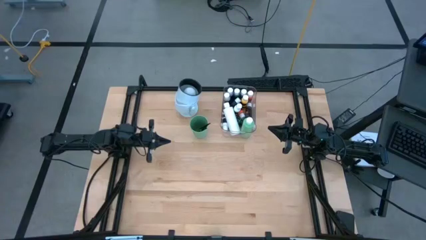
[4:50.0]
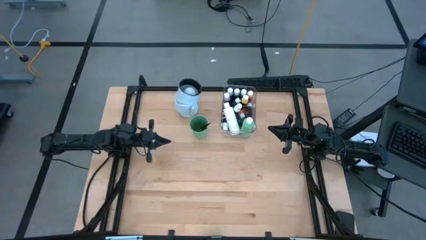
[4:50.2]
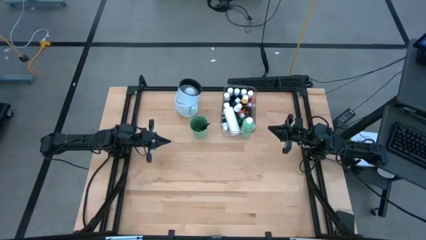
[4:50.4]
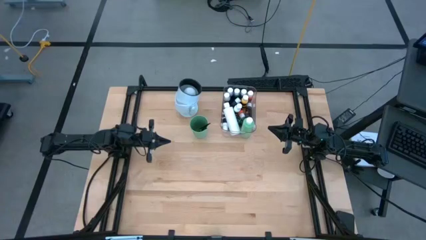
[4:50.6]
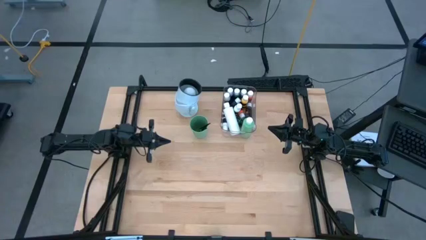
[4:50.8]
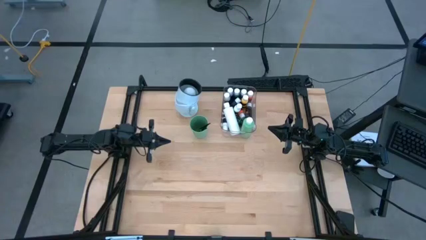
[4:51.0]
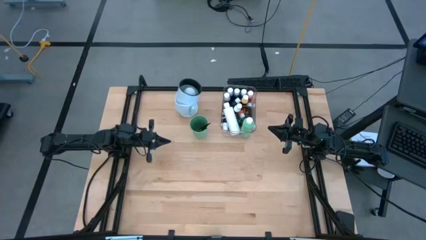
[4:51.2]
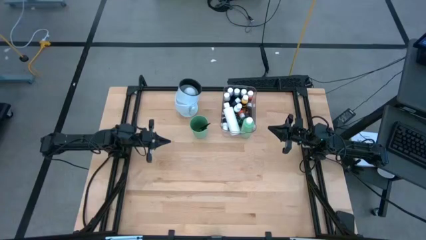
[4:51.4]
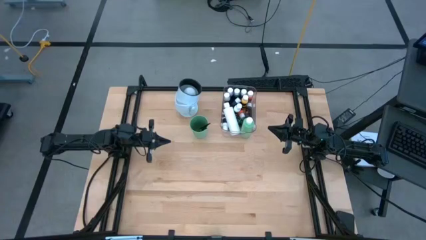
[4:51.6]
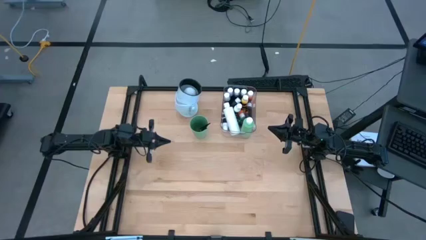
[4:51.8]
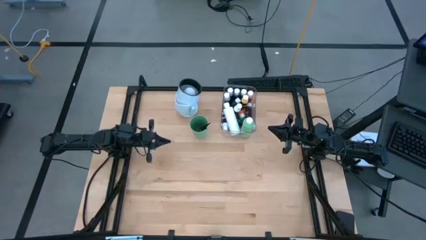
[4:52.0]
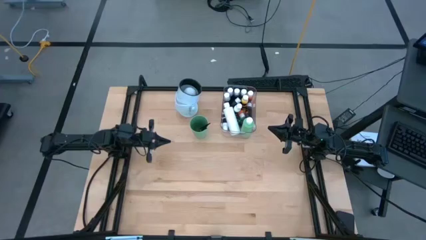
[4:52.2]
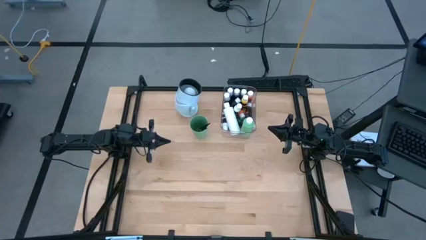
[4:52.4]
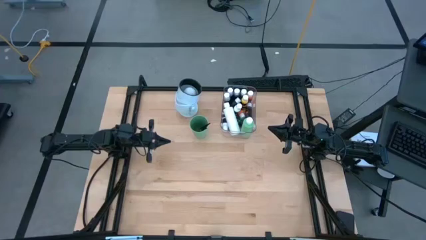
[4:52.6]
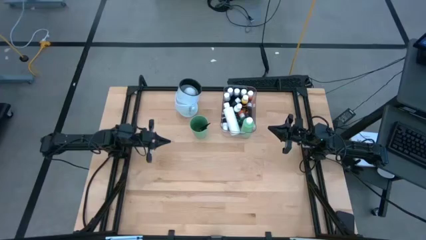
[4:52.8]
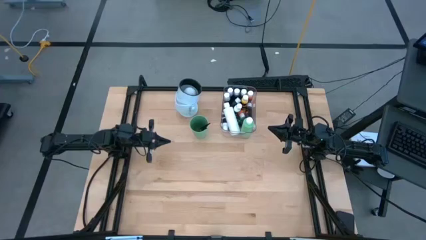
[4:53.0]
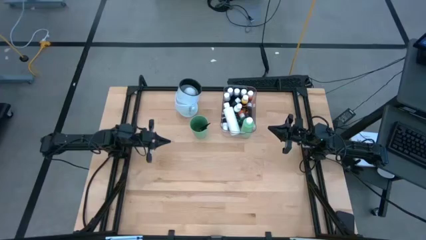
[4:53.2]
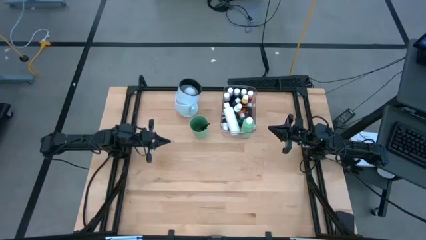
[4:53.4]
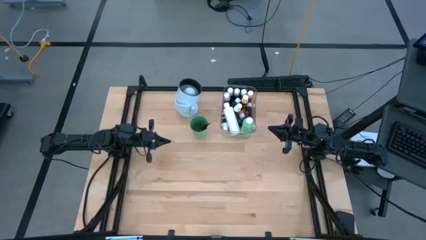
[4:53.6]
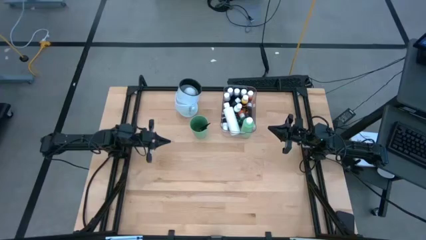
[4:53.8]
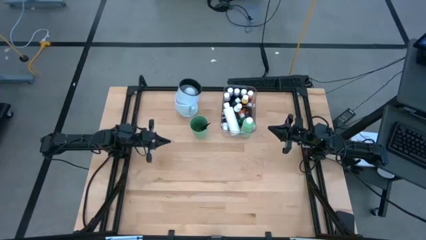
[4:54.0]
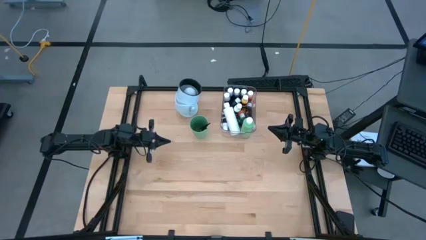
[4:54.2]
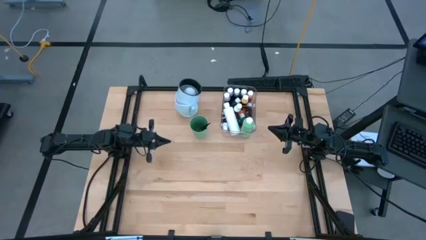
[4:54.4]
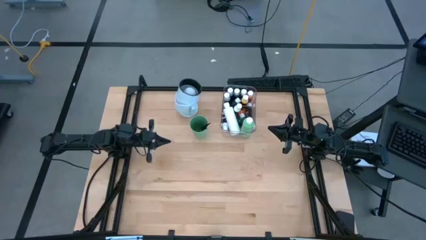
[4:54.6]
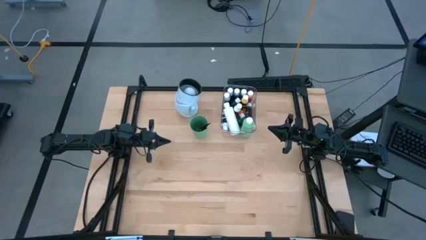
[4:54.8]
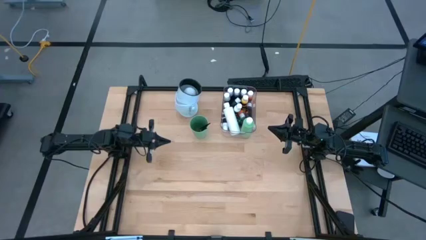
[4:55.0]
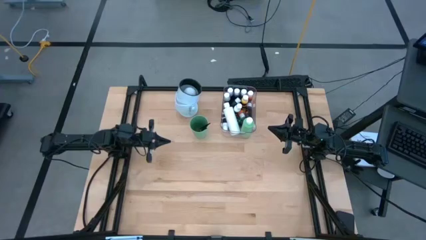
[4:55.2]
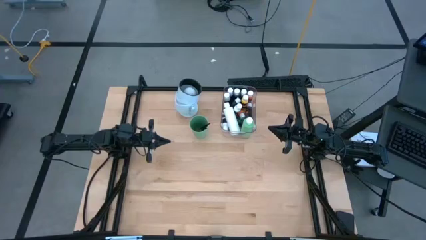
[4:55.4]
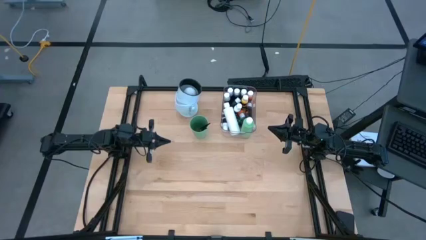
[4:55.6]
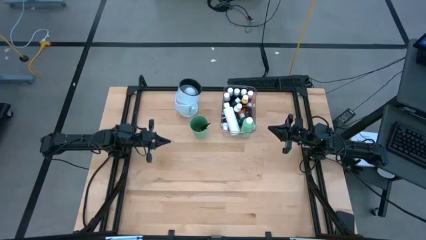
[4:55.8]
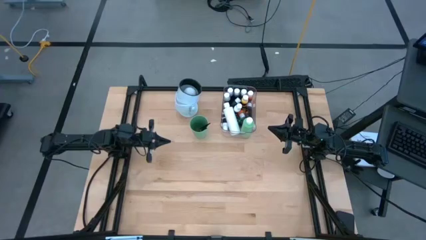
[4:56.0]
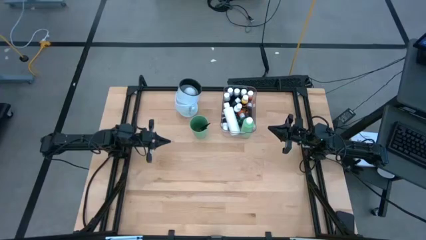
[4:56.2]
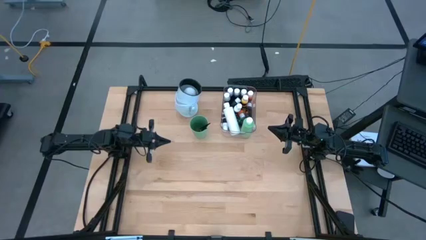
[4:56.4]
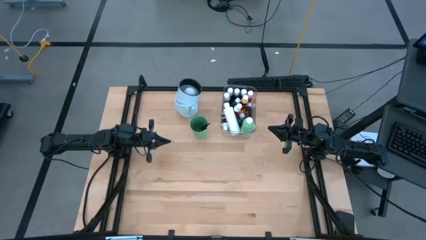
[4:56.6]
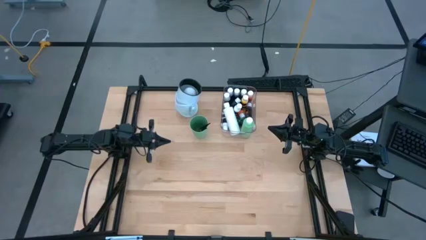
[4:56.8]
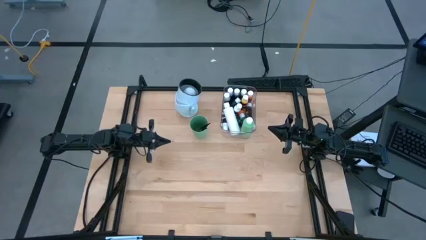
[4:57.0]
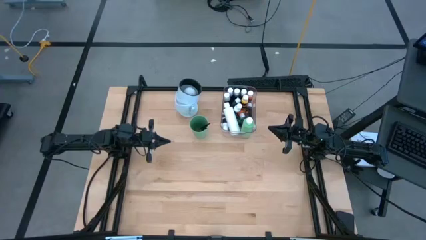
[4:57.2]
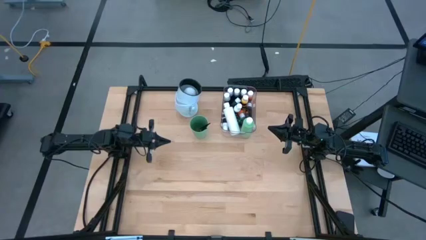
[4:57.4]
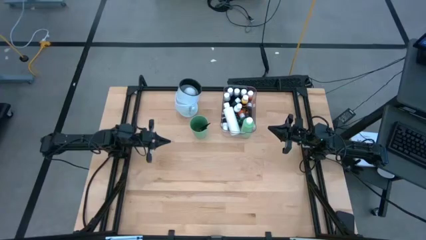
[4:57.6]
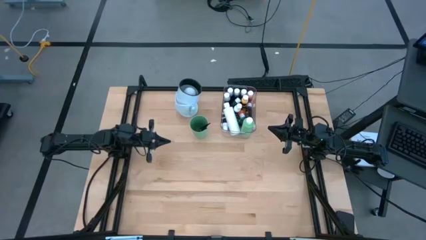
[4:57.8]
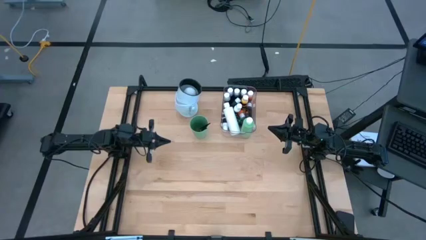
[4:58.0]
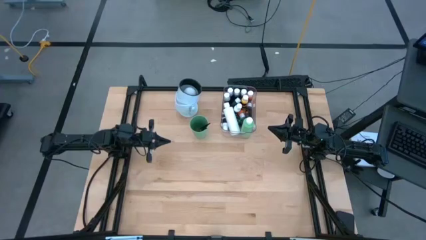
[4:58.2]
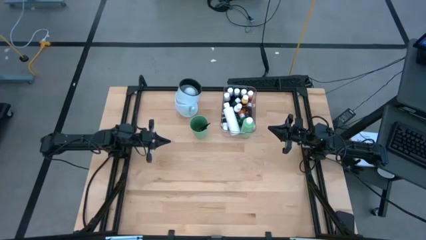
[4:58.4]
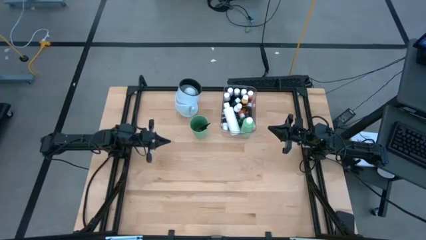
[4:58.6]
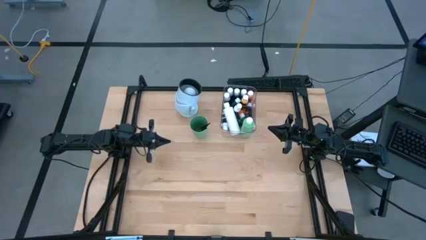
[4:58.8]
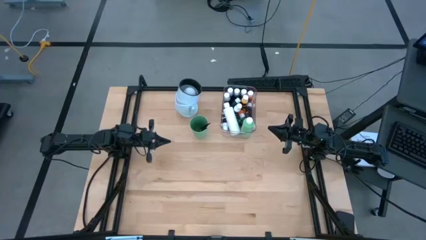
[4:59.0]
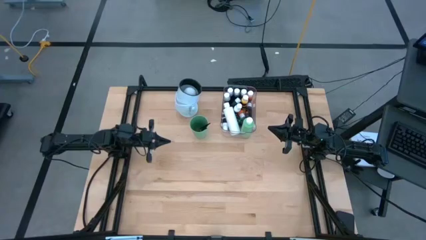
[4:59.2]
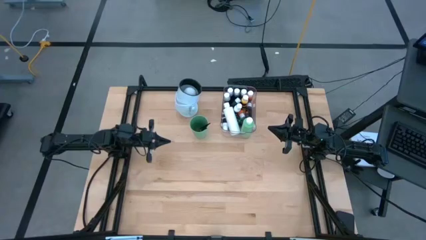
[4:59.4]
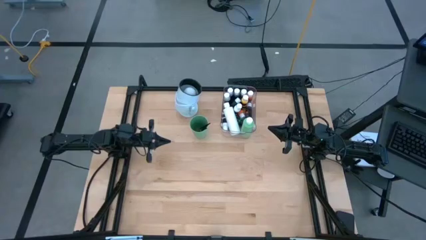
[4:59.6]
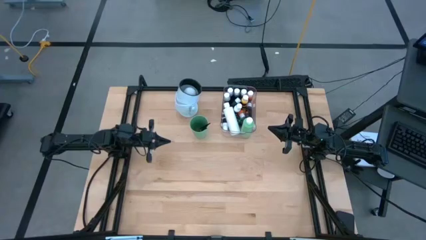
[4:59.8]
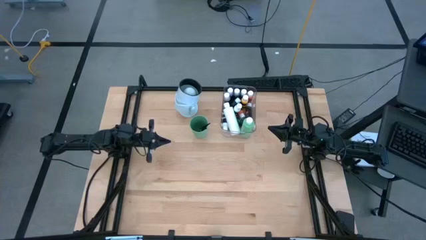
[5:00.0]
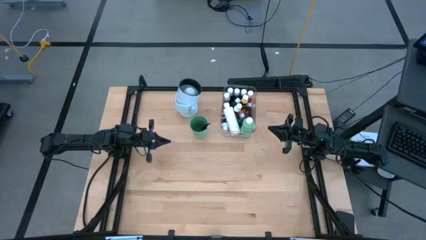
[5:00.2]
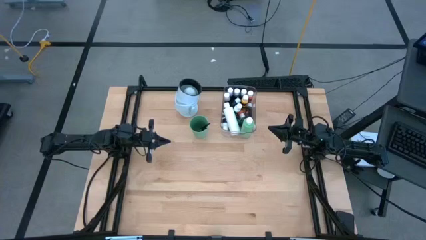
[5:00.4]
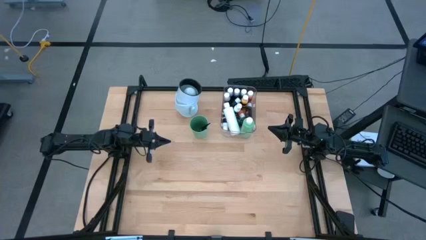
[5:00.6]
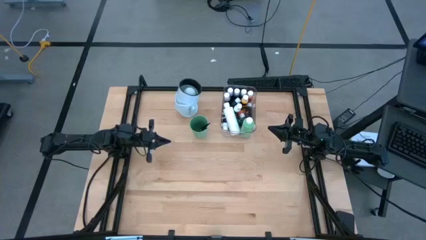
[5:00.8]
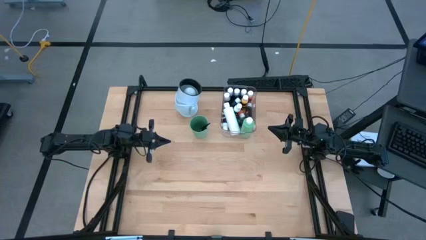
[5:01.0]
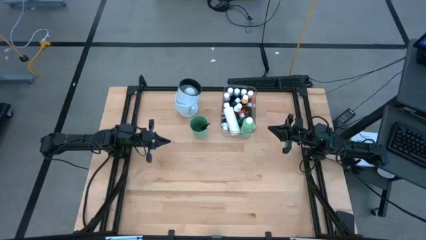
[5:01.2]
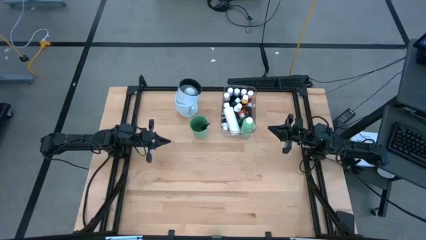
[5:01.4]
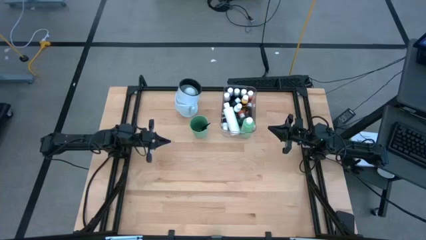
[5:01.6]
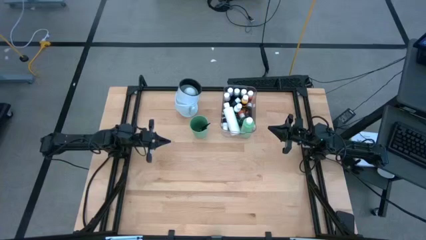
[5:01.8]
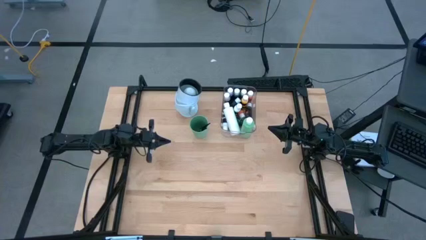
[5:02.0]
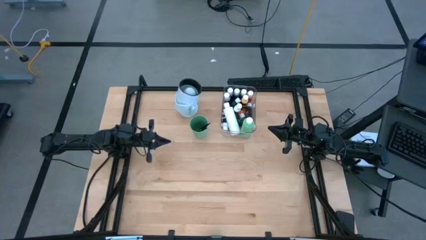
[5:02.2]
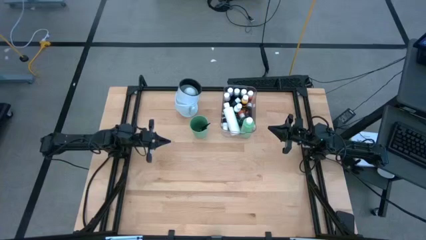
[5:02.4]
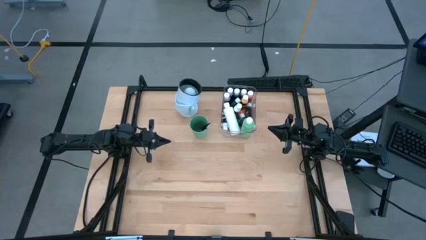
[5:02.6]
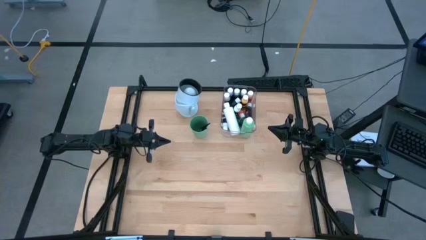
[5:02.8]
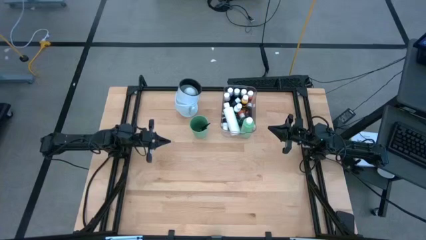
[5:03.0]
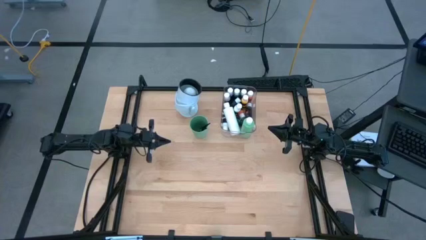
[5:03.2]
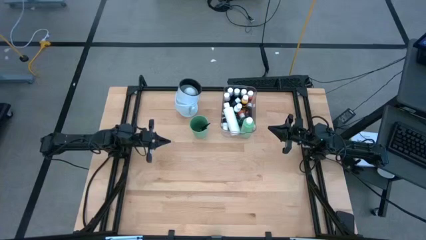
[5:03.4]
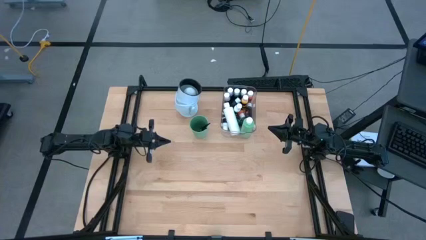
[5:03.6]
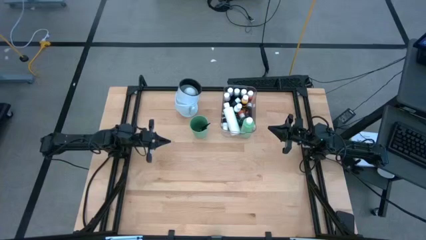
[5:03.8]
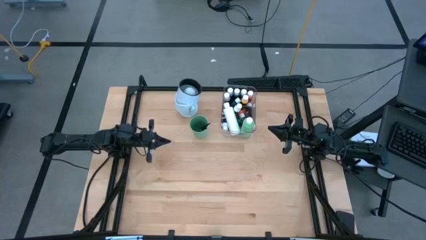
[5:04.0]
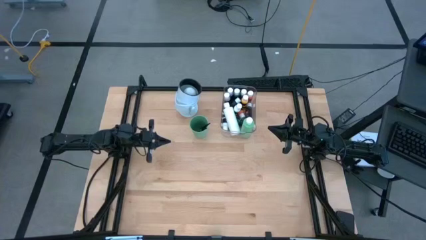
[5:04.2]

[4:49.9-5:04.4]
Task: Pick & Place Paint Supplies
Return to Home Position
